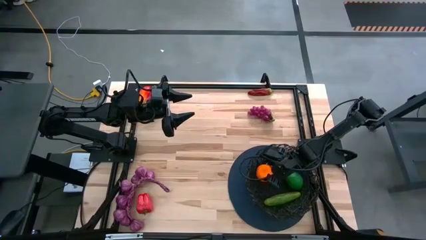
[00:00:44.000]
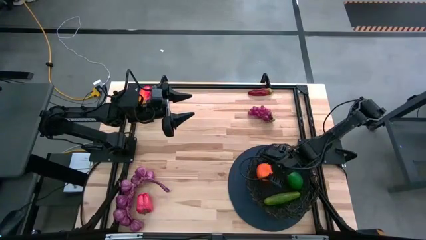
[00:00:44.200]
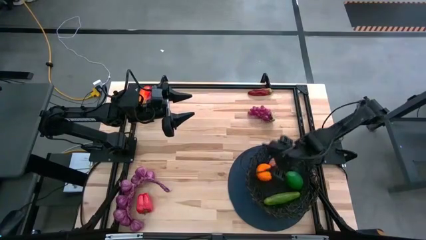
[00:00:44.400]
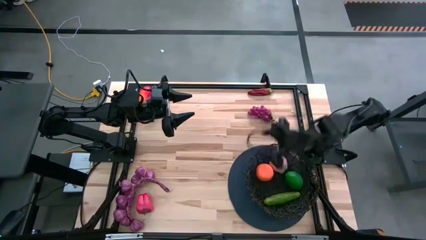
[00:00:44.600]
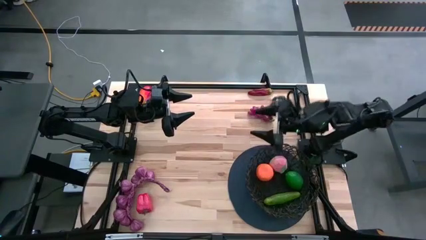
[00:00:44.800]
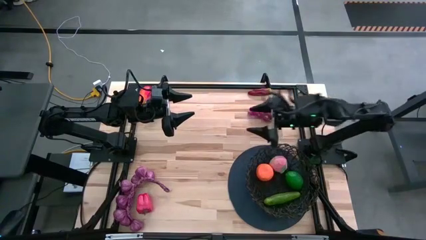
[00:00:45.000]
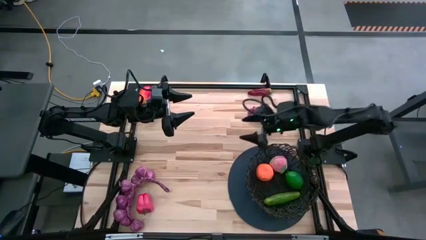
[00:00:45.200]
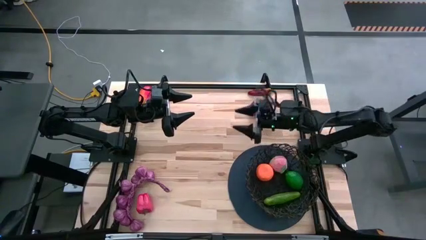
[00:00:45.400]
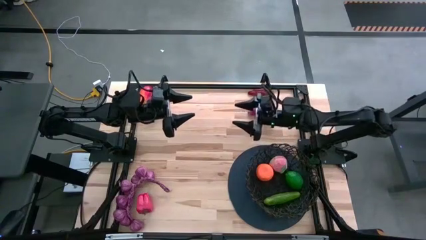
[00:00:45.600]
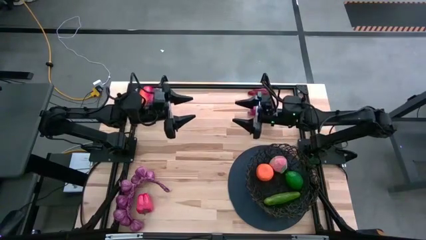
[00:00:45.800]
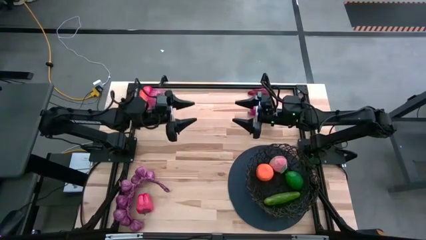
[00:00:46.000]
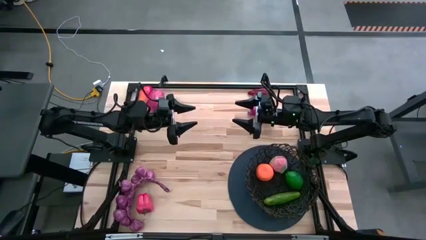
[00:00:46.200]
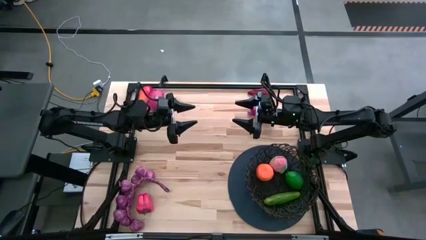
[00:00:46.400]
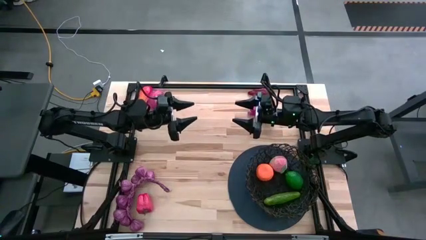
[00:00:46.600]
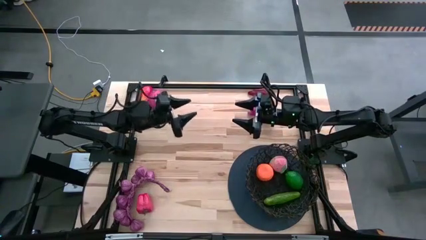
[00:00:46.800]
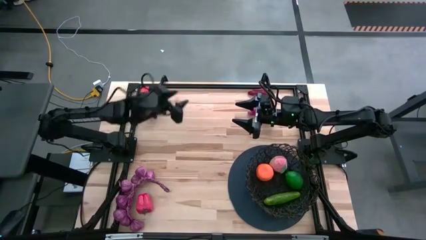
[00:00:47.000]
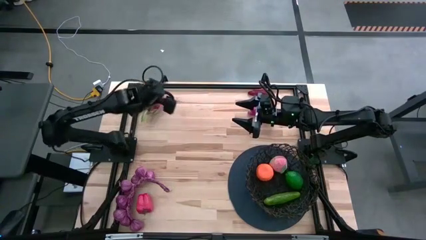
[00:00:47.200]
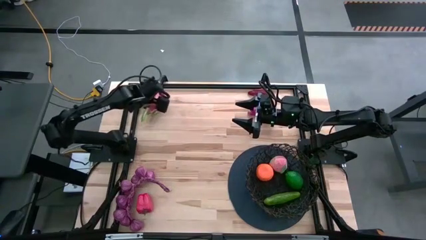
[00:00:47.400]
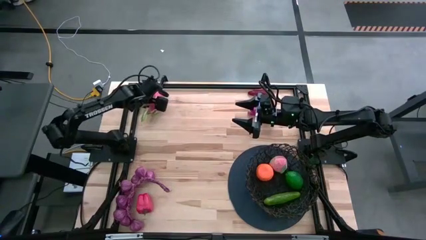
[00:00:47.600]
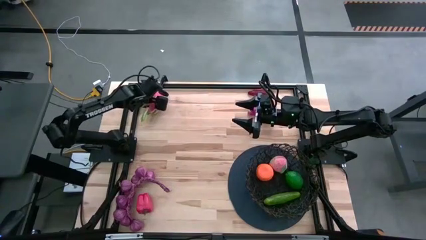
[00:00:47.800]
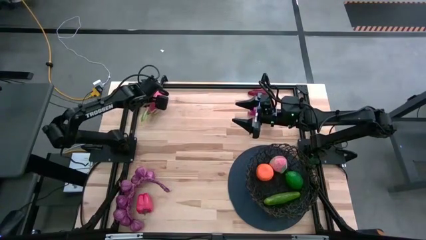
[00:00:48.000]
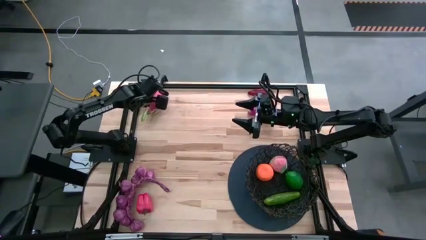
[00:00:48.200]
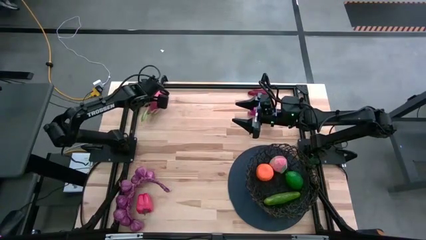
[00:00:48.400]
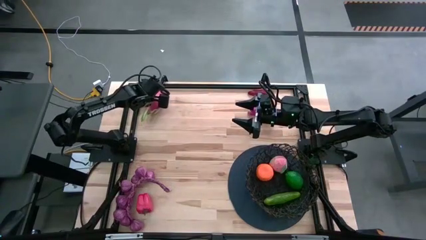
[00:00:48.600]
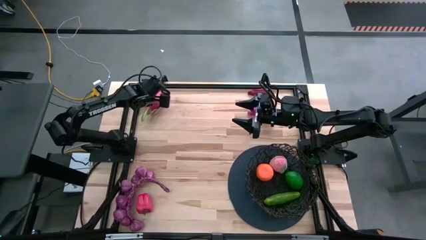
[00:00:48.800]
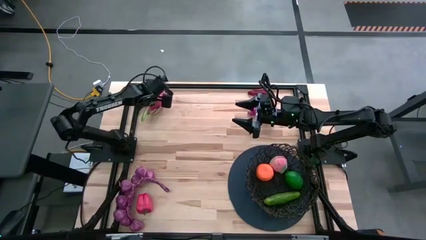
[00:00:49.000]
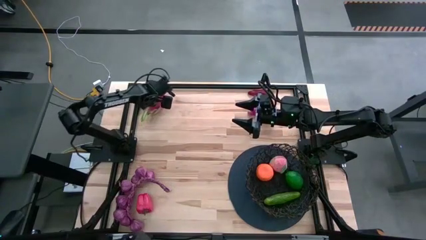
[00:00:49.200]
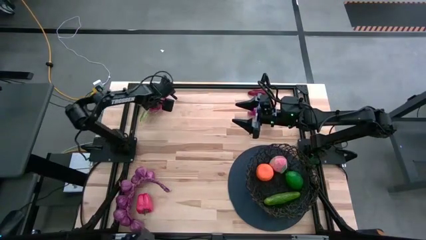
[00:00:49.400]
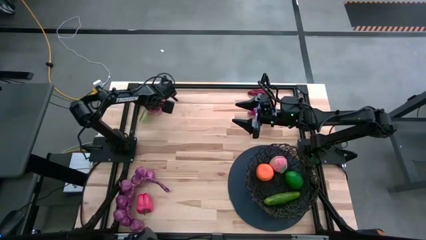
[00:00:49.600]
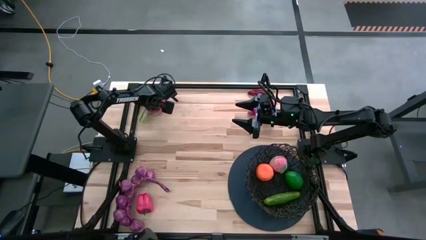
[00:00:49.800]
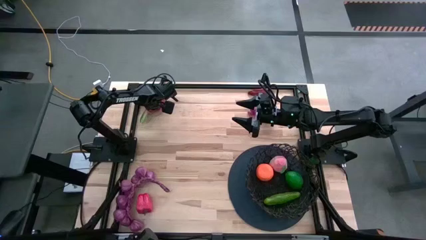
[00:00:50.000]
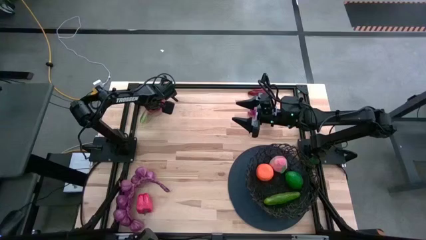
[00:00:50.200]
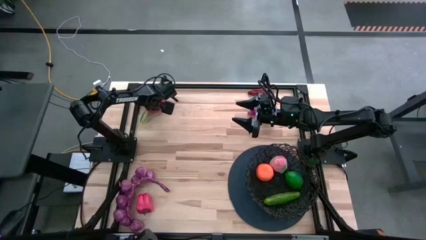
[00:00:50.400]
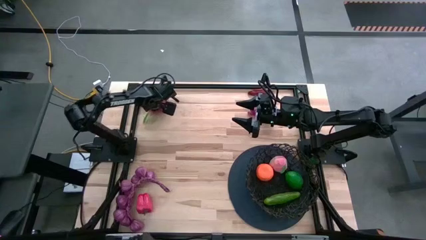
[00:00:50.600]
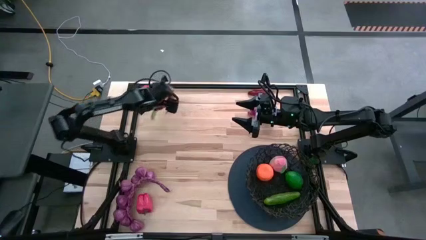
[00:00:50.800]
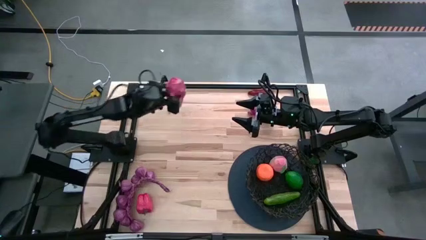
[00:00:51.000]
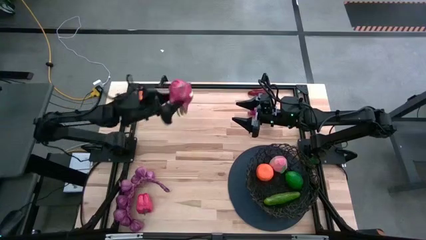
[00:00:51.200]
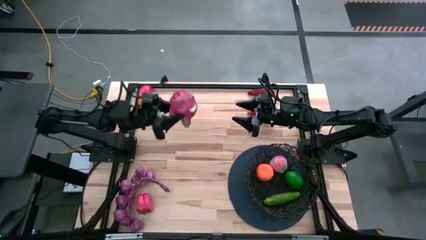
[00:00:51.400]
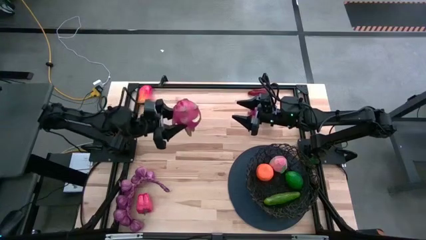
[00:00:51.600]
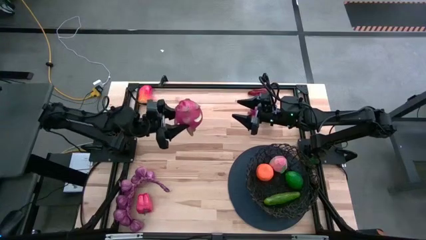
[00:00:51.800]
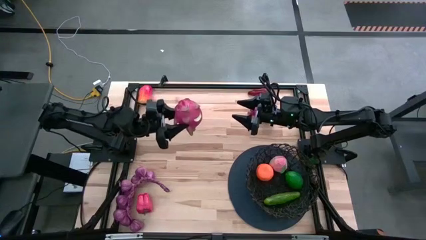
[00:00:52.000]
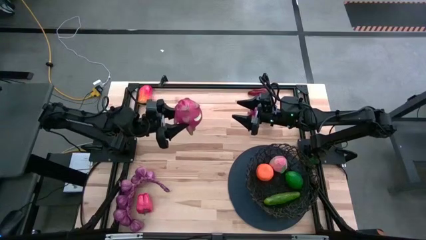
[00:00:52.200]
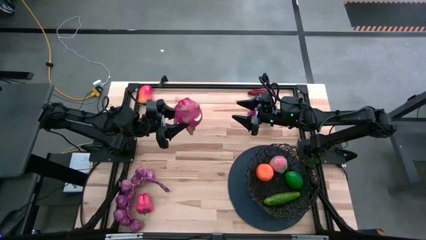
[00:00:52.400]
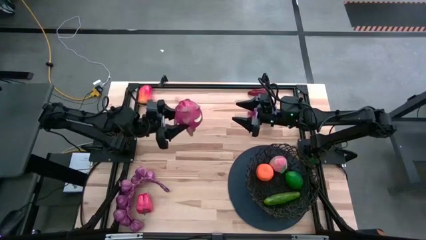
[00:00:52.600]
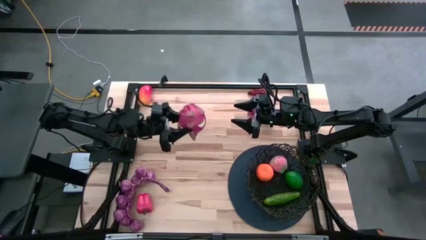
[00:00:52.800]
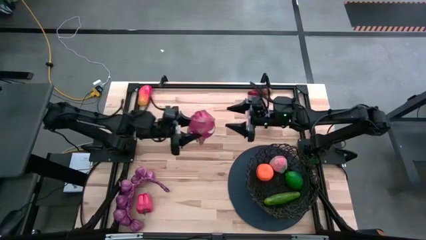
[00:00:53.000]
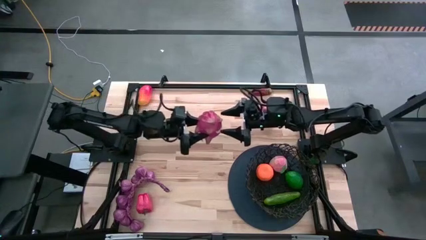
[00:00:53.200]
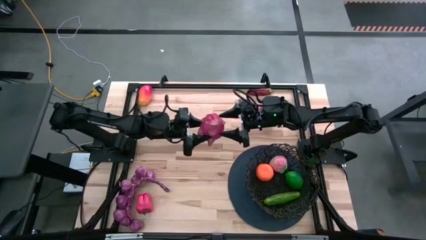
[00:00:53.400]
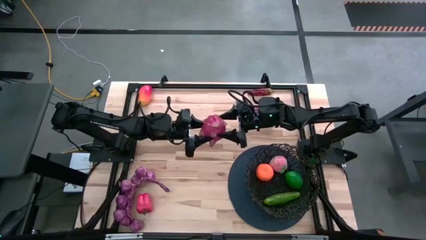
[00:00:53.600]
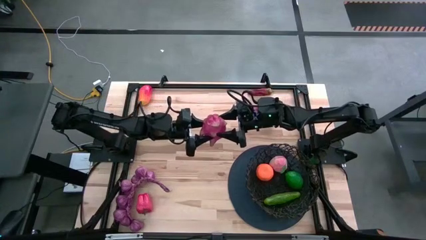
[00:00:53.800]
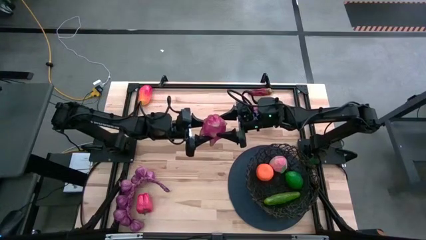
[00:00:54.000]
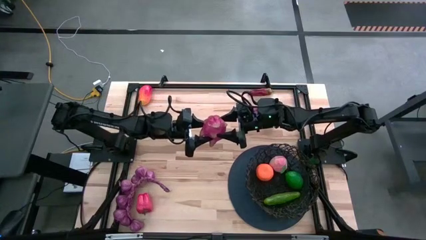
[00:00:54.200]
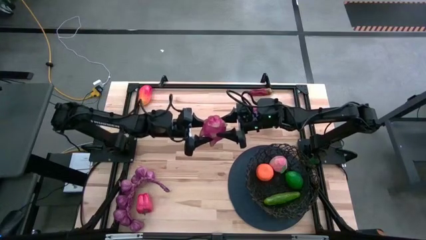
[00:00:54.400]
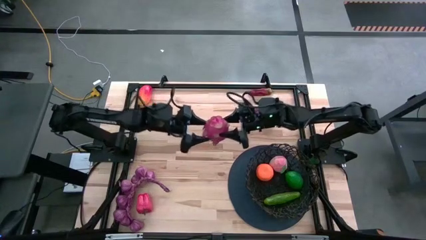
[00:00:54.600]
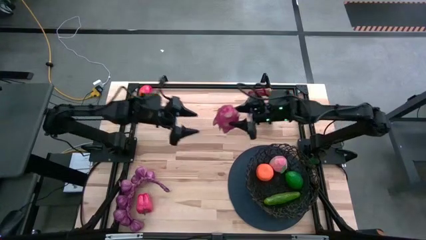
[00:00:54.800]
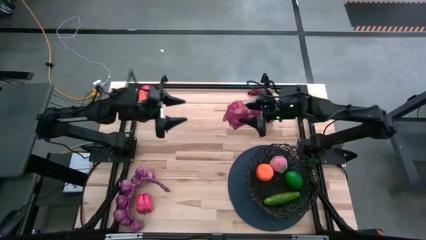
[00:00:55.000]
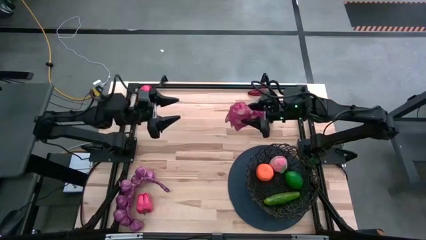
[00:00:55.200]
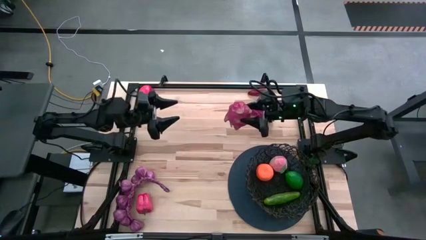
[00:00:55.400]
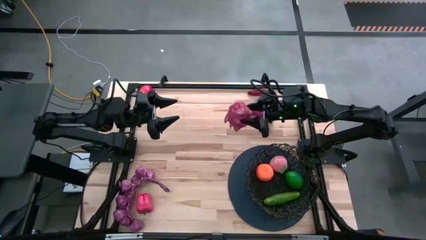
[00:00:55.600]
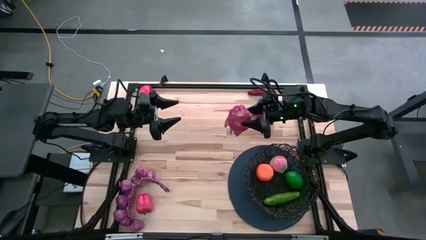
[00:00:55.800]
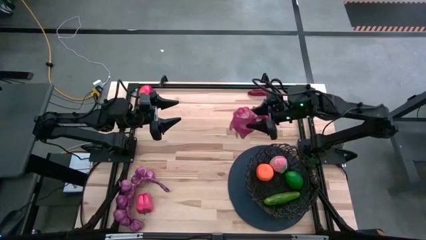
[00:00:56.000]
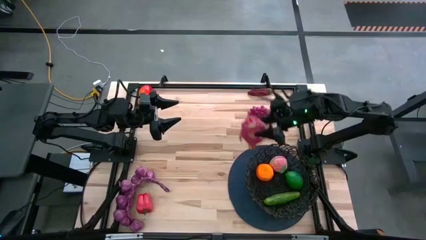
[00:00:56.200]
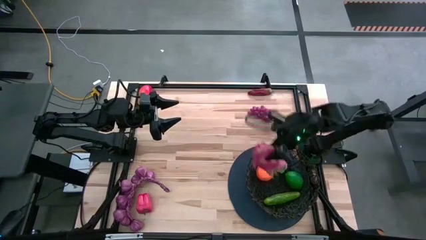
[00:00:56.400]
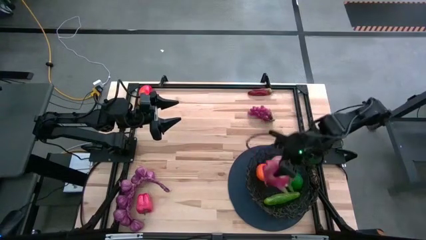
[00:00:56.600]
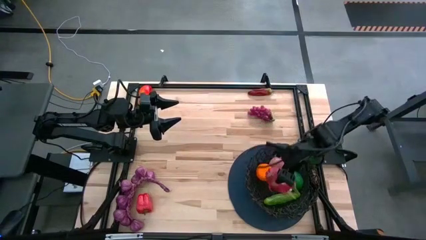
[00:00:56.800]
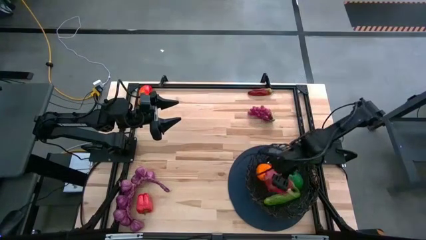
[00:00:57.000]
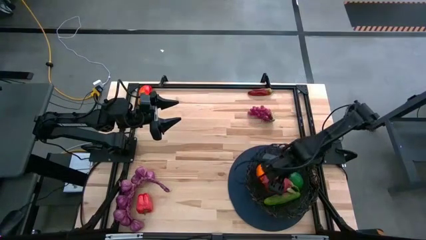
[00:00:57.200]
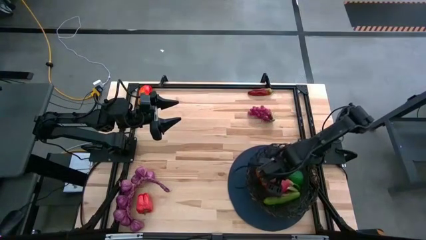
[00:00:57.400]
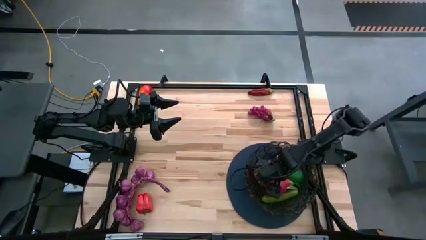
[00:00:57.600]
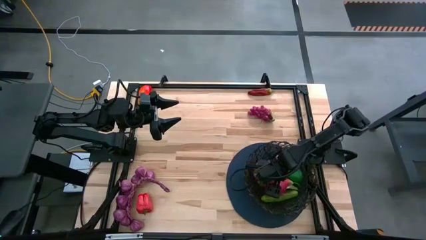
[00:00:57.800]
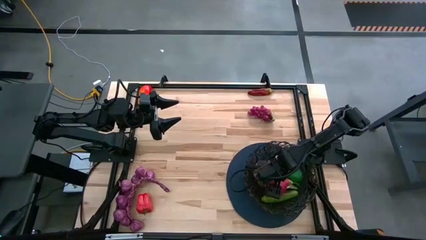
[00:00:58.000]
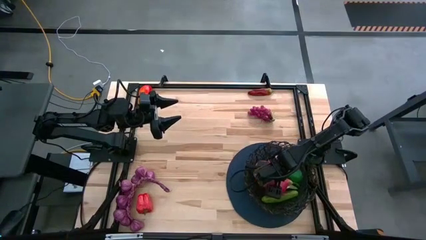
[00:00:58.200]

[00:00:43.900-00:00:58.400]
Task: Build produce basket
Put the pink dragonfruit into the basket

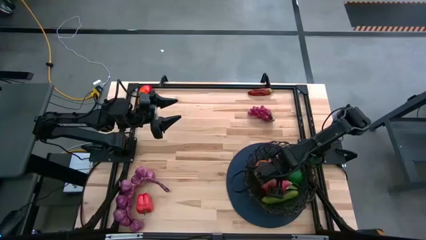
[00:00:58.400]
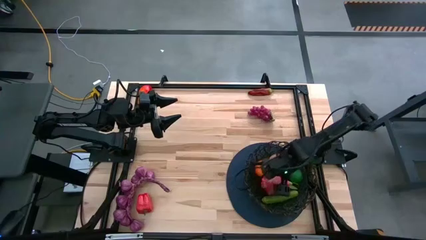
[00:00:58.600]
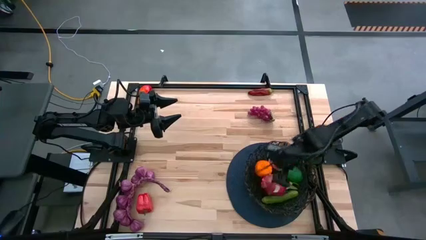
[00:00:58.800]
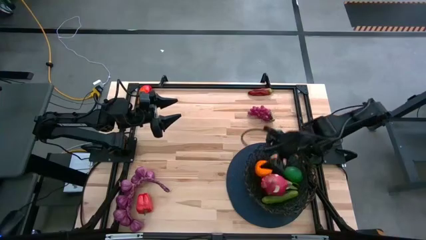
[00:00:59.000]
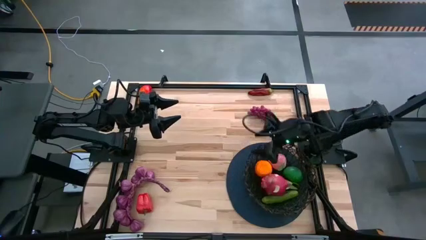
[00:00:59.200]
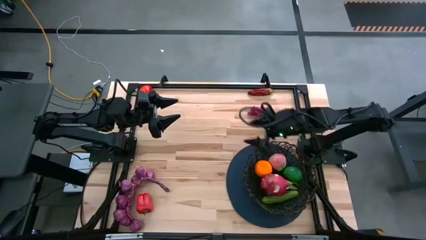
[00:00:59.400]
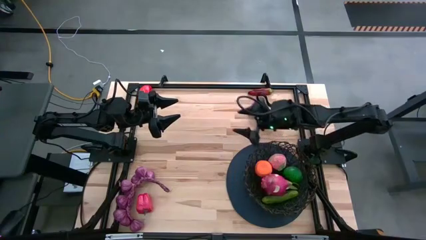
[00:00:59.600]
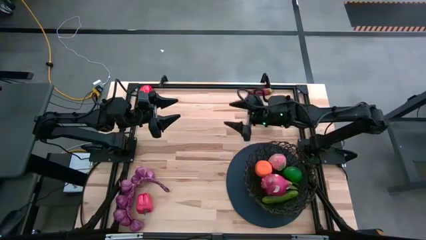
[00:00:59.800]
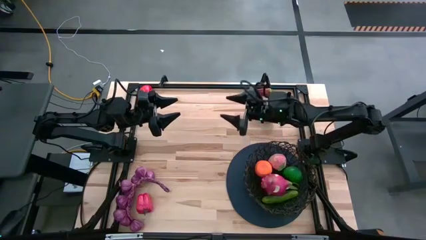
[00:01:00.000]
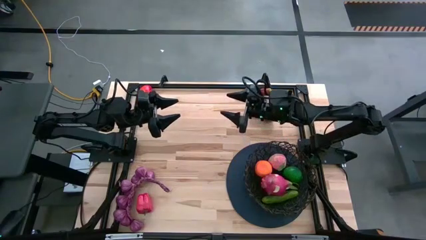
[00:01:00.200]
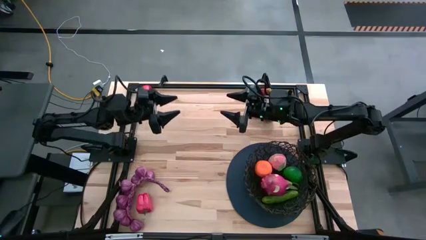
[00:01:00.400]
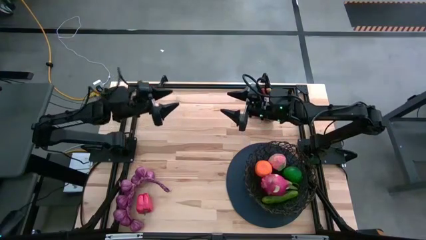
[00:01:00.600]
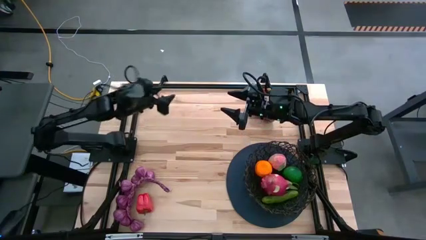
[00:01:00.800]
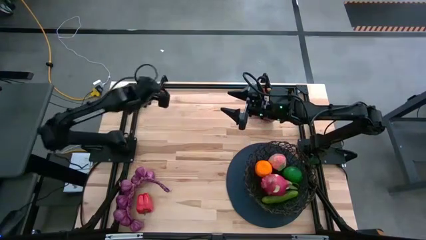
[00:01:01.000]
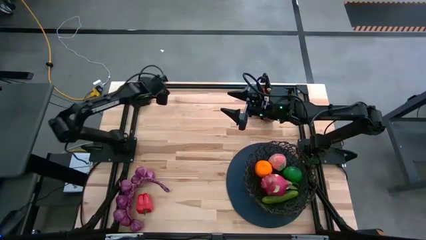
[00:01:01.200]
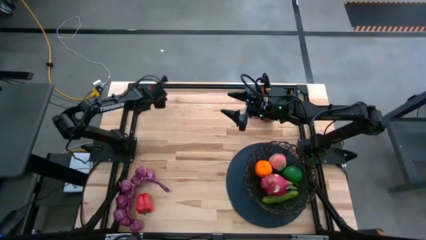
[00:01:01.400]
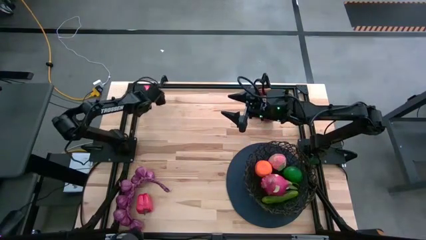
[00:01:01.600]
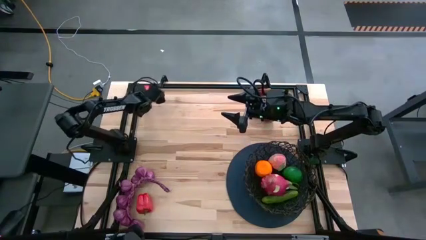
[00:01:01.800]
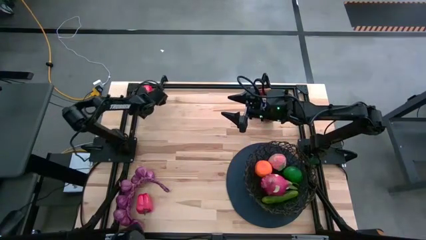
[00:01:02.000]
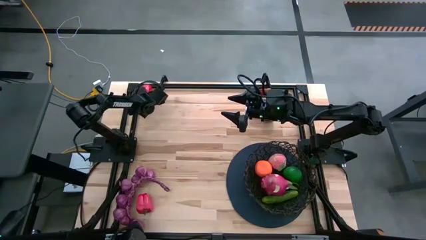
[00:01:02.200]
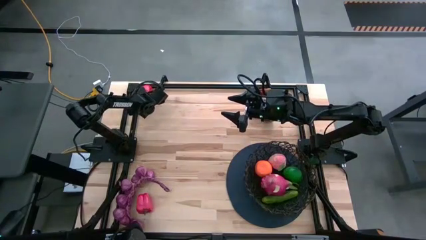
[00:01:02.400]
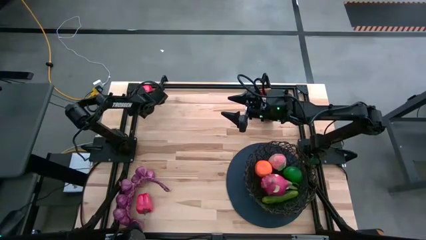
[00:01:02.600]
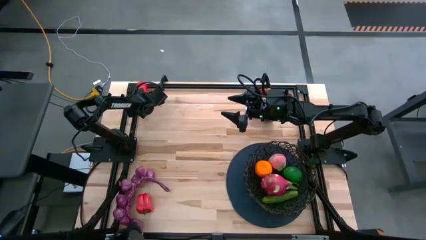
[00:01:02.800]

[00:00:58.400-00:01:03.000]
Put the orange mango into the basket
